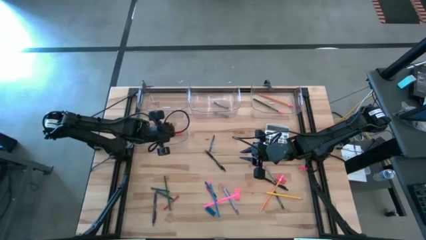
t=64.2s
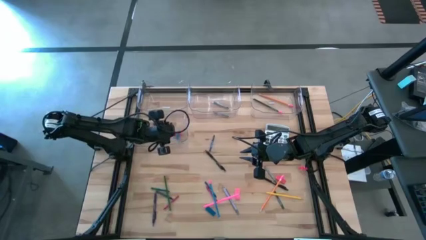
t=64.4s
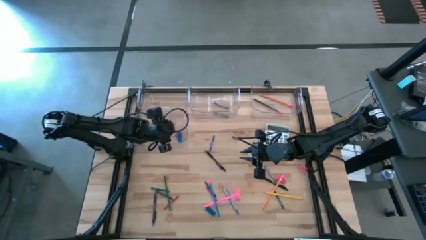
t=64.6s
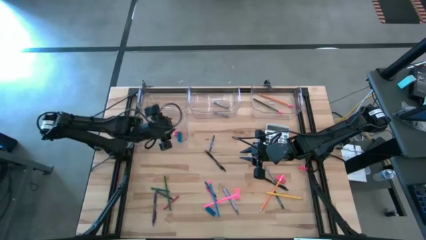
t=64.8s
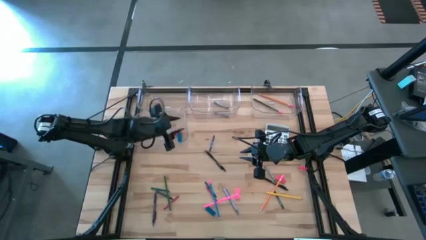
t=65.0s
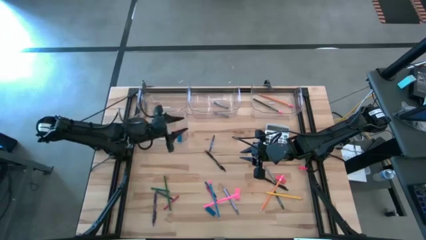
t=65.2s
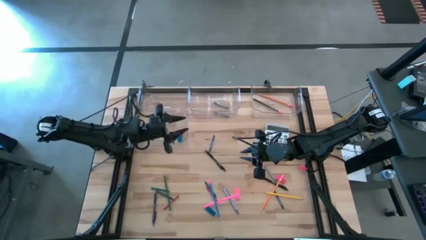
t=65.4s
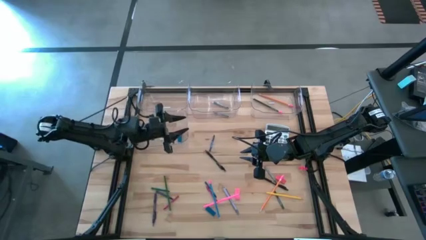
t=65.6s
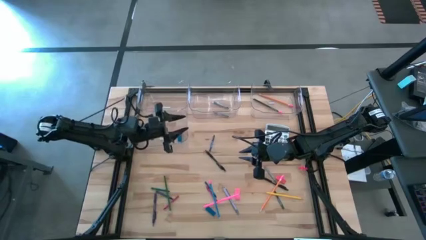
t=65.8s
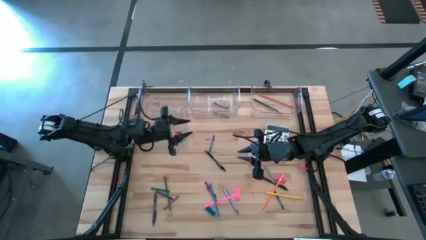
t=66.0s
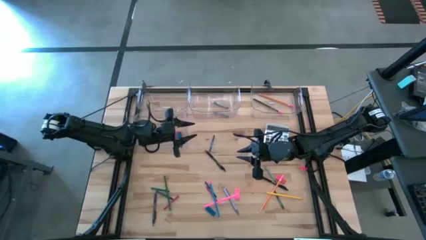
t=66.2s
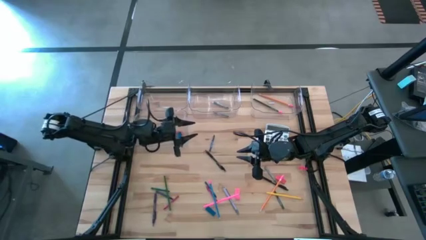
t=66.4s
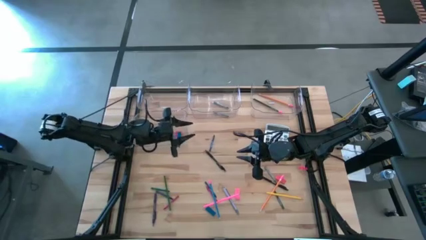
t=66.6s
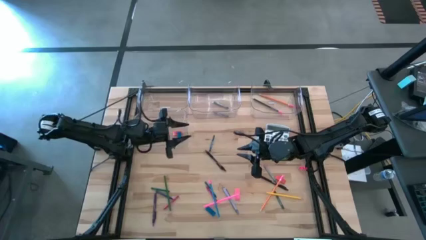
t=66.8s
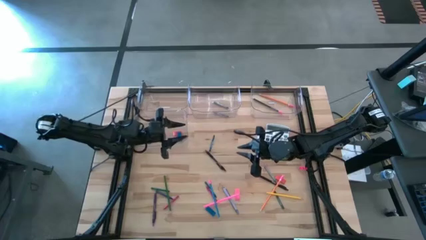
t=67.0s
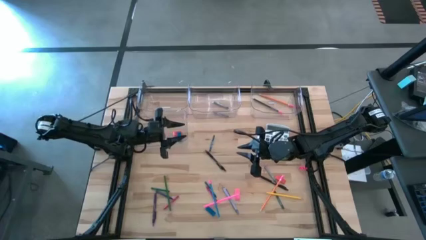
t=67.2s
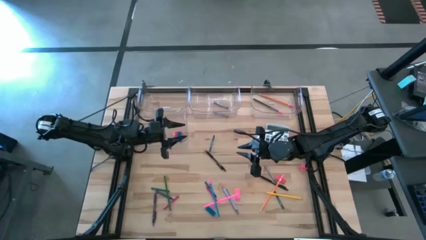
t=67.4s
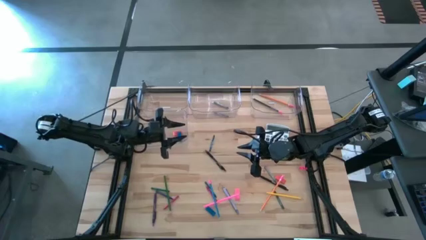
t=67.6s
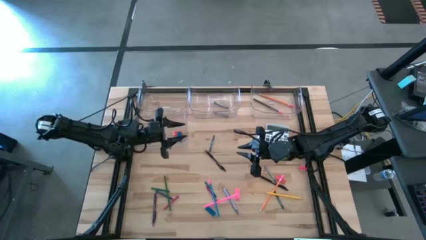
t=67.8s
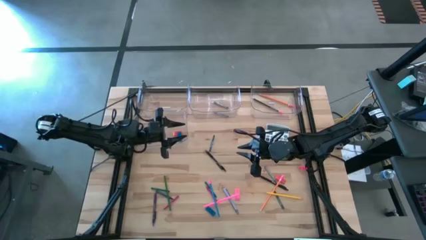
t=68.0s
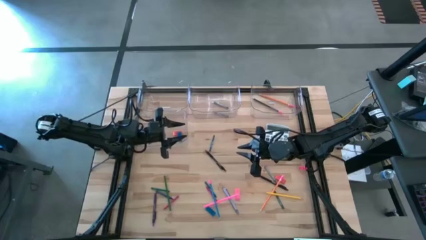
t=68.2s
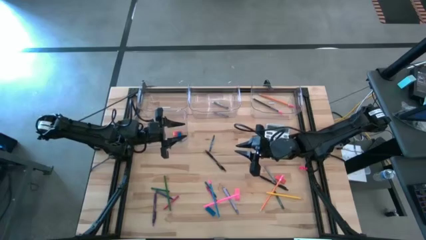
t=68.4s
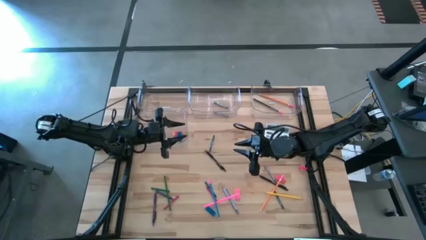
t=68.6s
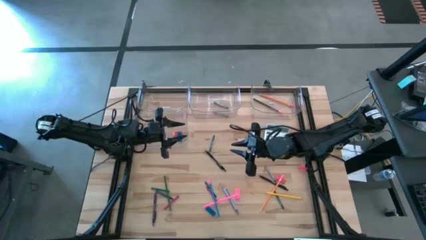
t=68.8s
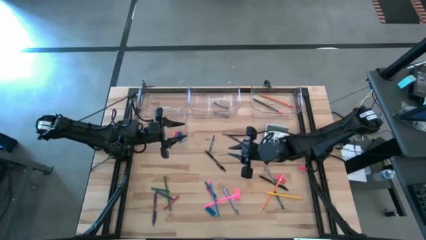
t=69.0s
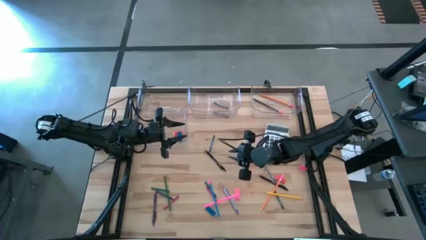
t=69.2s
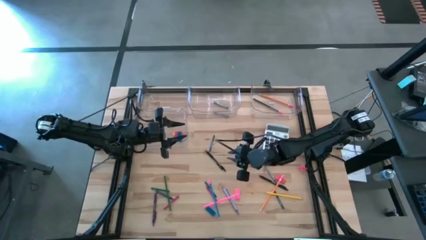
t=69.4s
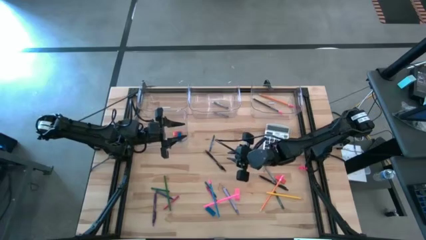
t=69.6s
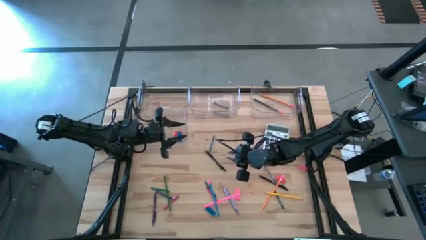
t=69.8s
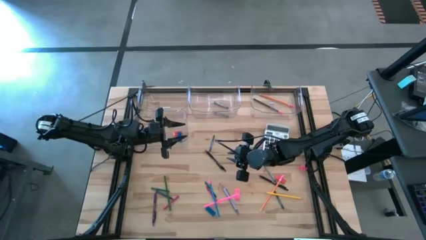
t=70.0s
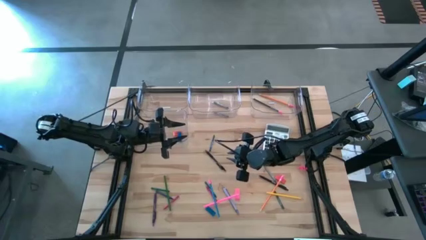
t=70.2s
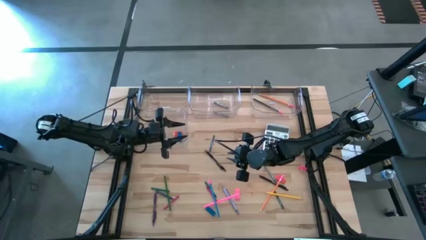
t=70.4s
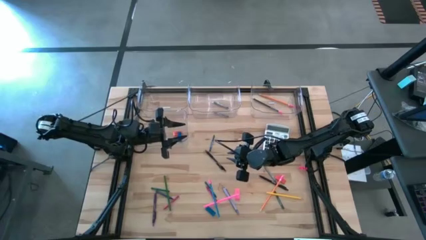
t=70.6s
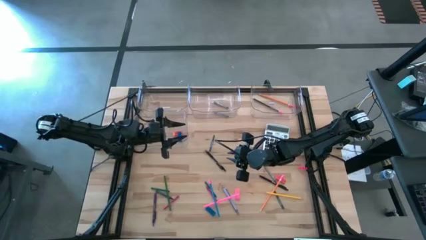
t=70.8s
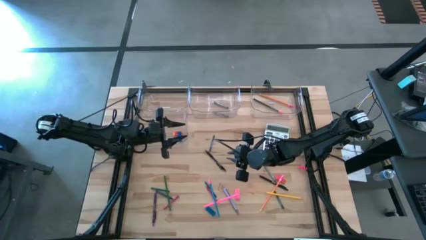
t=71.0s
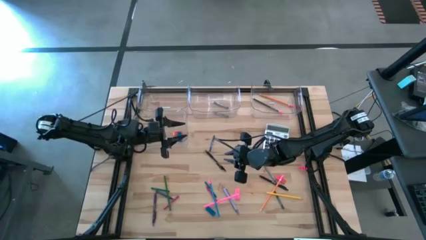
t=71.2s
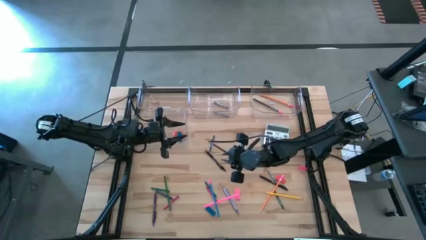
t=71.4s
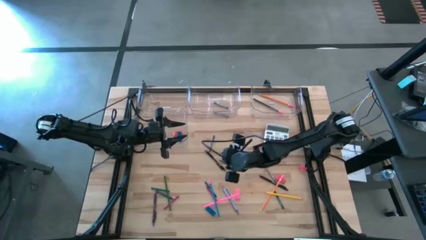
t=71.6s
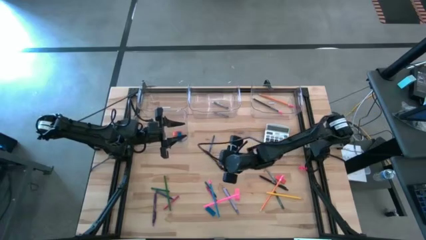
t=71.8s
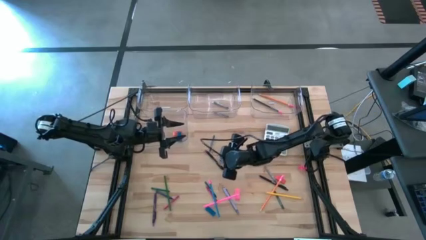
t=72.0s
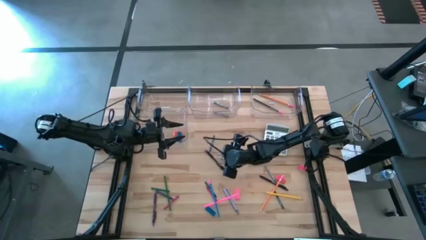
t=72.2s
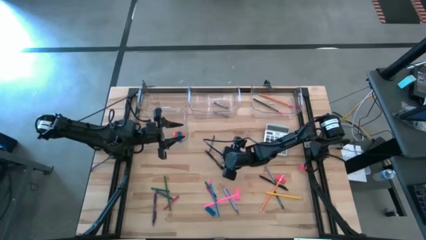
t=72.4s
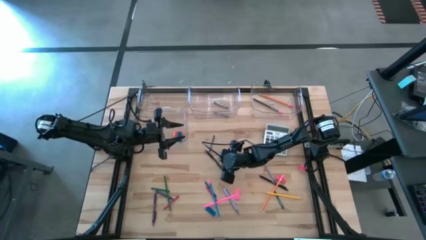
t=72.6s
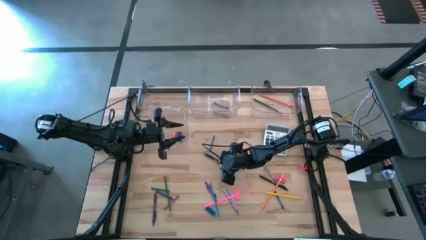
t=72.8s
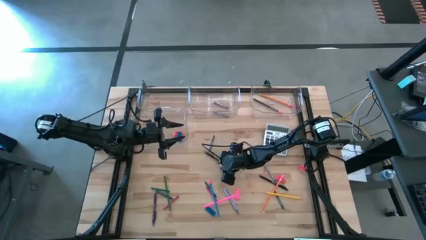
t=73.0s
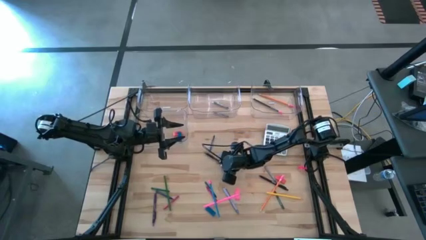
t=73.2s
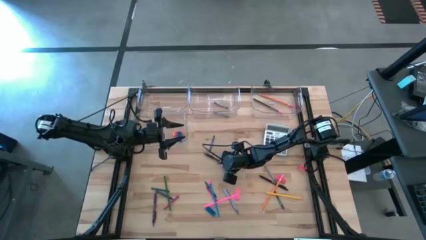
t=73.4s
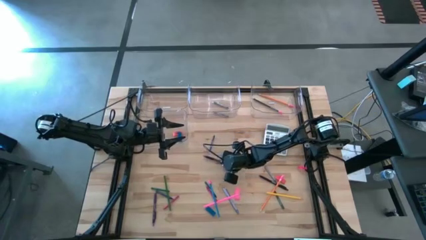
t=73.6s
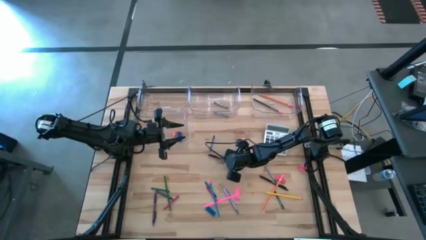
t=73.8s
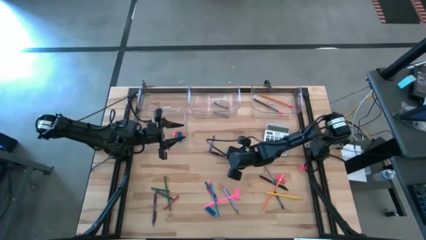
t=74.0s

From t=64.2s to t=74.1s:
Task: Sort crayons/erasers/pens/pencils in bins
Put the black pen into the top left transparent bin

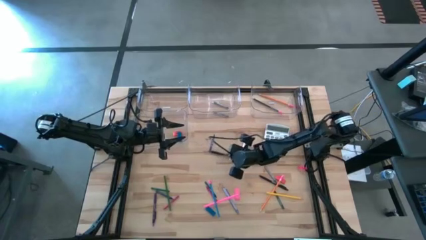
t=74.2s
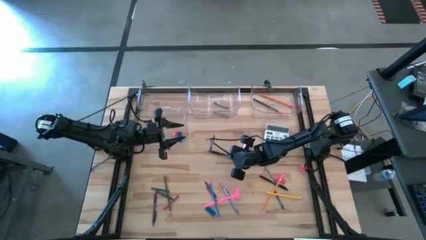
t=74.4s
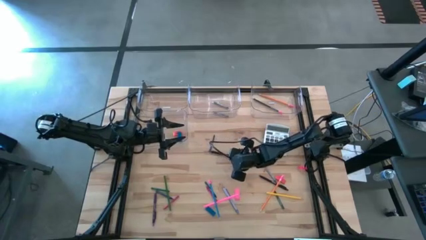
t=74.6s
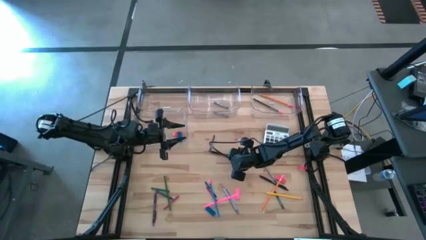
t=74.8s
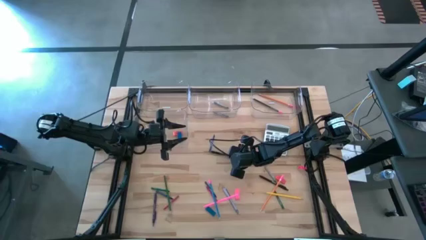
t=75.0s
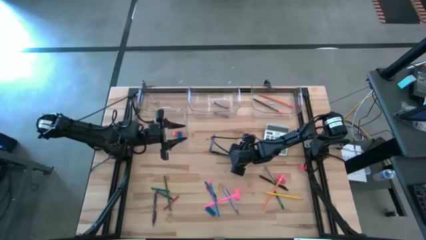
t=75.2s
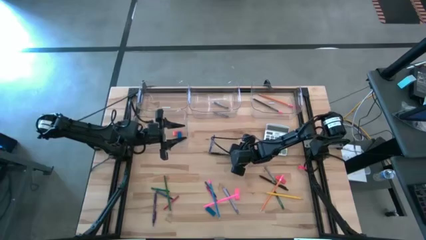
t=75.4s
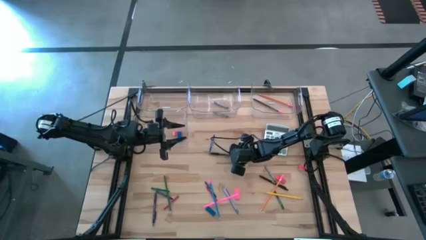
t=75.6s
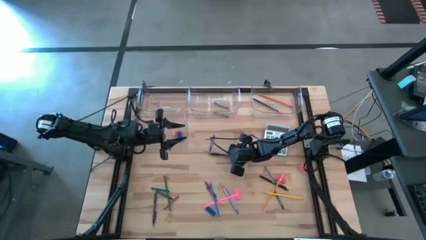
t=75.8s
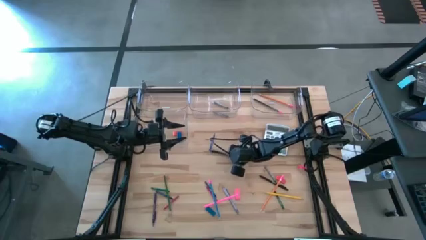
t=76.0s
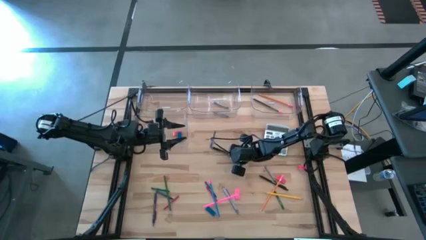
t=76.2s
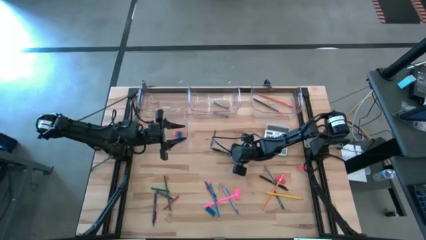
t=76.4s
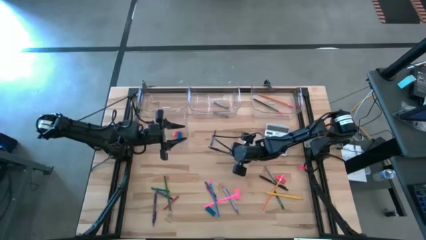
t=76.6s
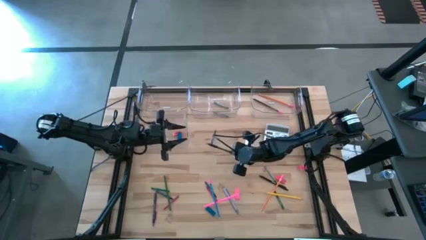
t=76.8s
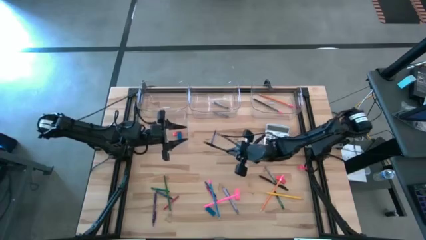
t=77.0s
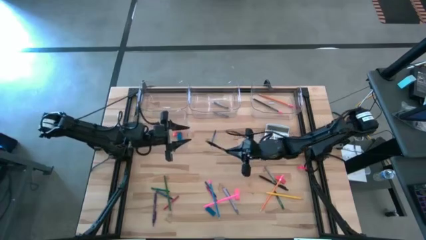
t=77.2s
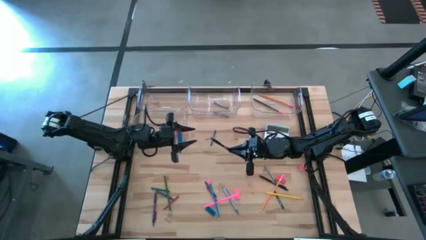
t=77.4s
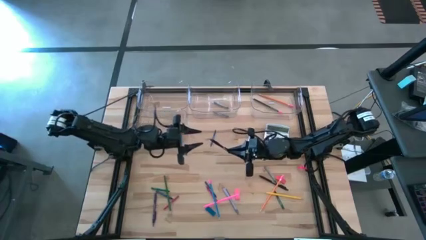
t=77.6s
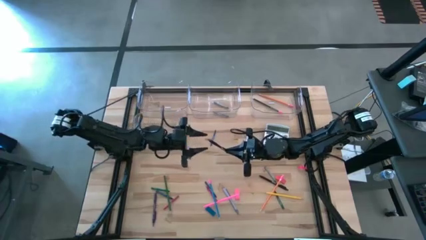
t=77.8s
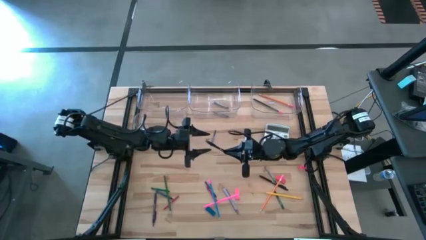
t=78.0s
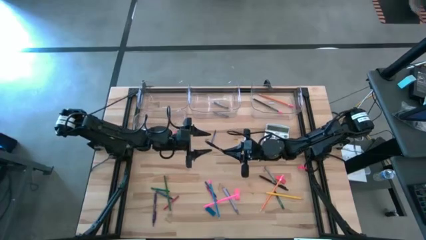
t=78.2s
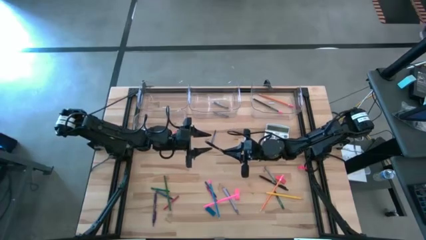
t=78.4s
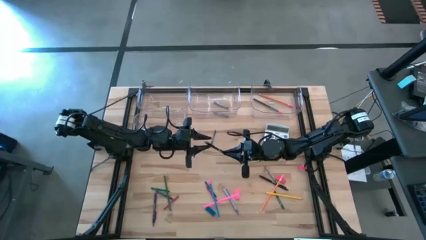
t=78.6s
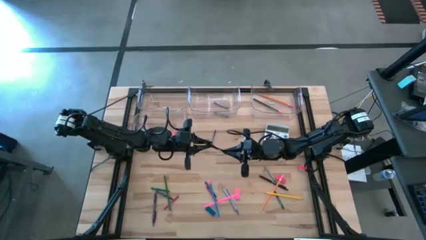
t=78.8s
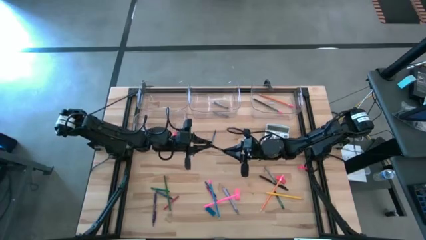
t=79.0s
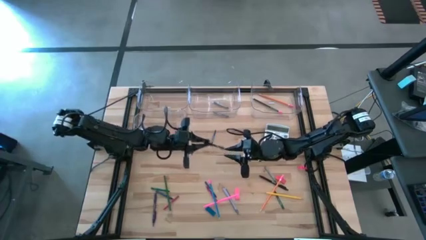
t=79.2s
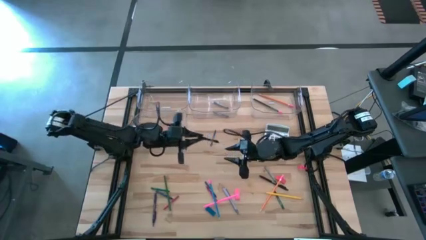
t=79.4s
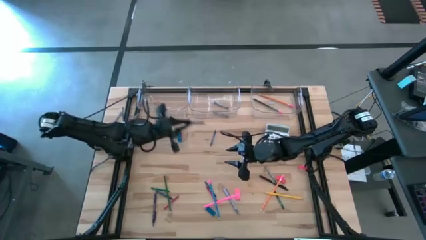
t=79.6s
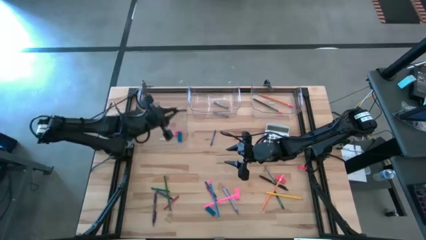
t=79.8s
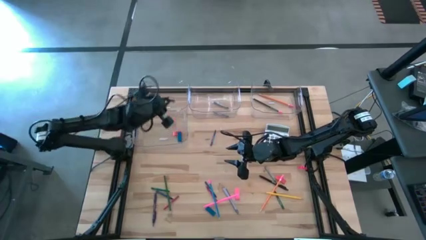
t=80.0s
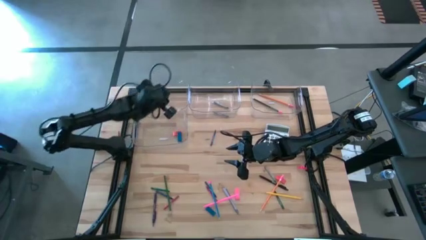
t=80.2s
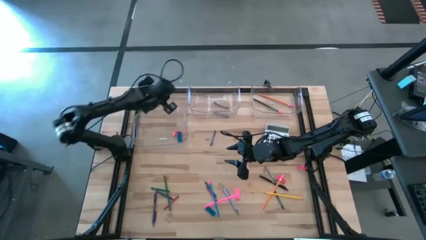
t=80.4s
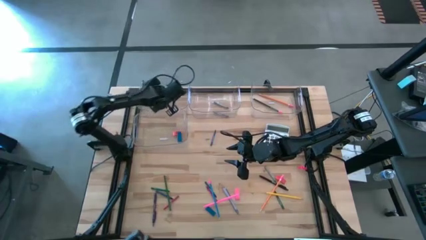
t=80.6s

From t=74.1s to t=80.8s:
Put the black pen into the top left transparent bin
